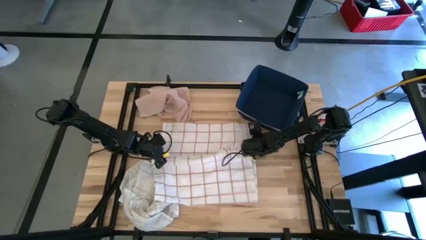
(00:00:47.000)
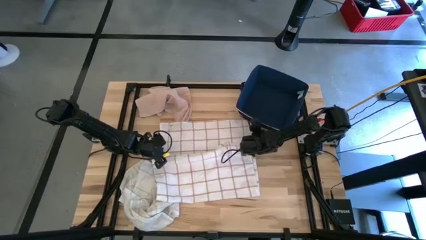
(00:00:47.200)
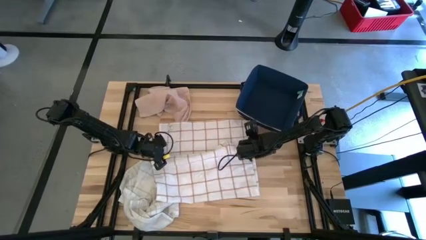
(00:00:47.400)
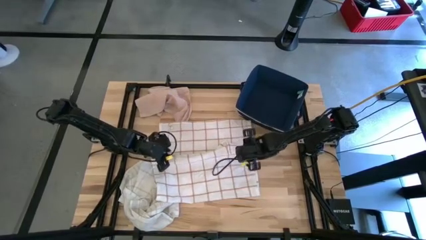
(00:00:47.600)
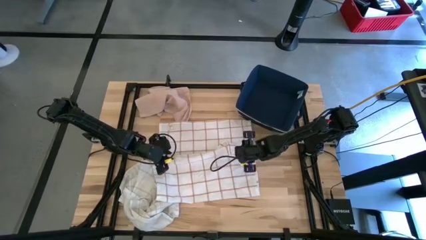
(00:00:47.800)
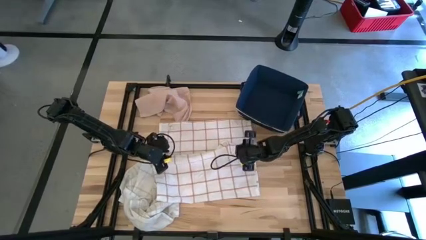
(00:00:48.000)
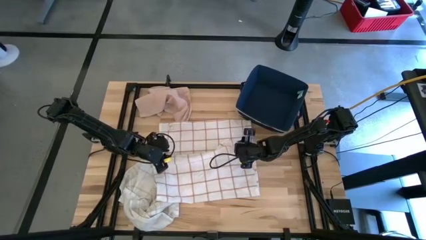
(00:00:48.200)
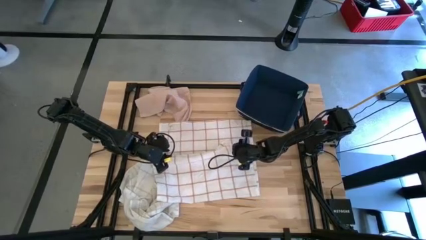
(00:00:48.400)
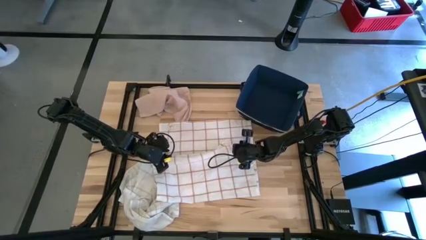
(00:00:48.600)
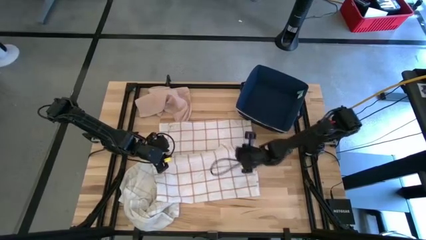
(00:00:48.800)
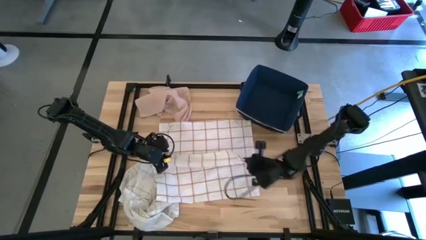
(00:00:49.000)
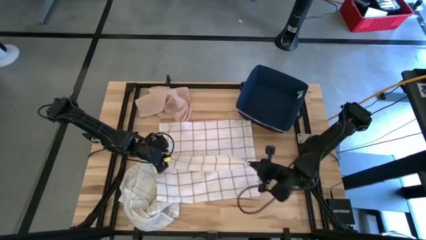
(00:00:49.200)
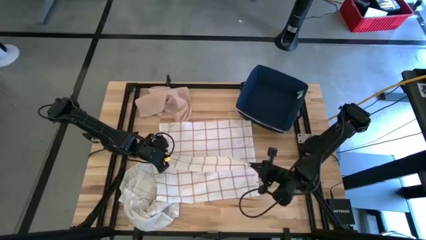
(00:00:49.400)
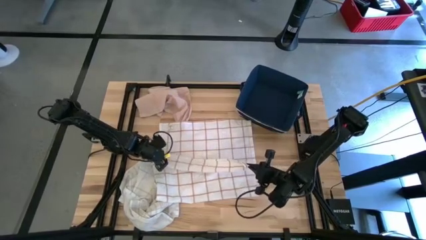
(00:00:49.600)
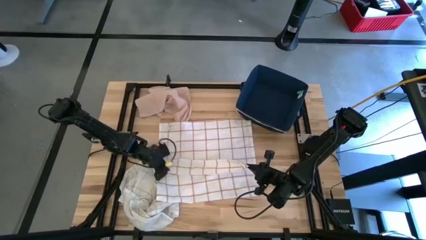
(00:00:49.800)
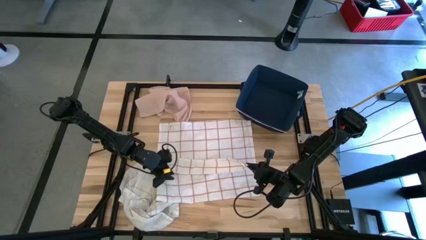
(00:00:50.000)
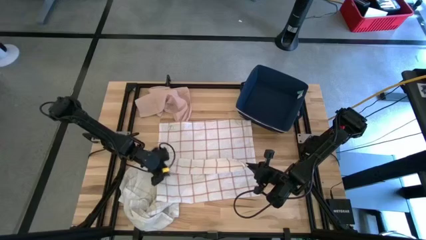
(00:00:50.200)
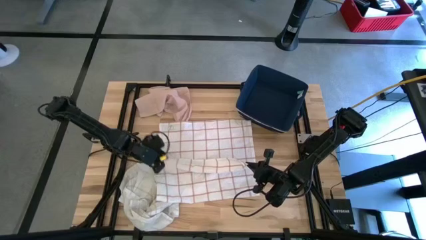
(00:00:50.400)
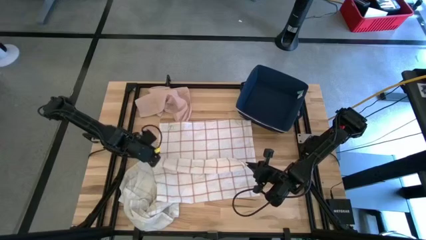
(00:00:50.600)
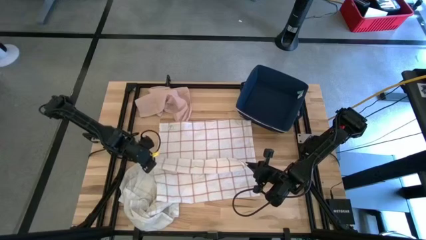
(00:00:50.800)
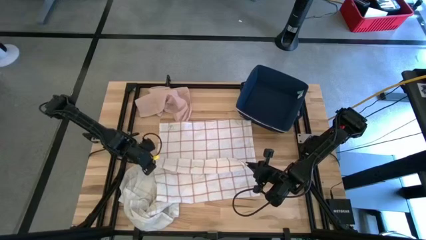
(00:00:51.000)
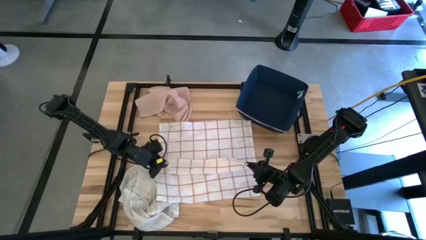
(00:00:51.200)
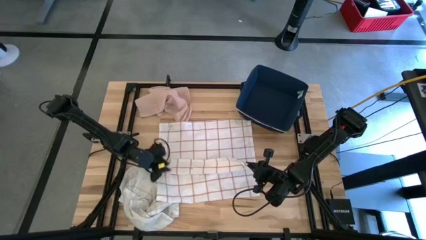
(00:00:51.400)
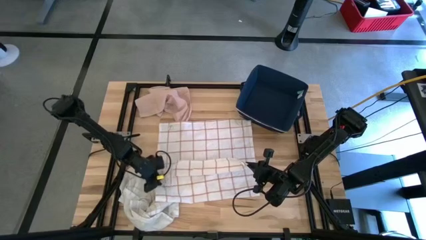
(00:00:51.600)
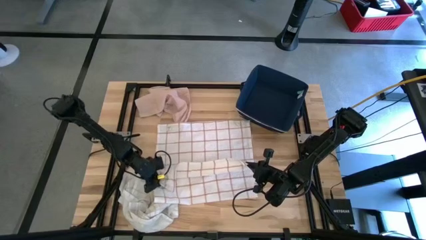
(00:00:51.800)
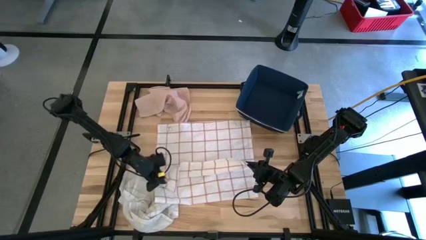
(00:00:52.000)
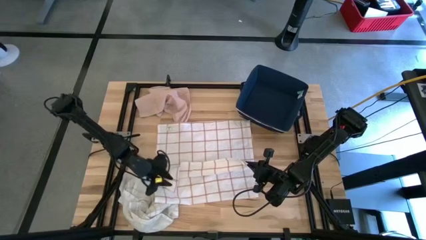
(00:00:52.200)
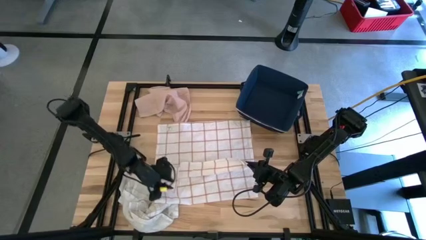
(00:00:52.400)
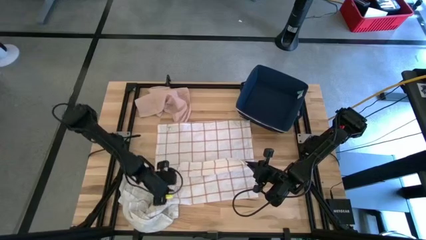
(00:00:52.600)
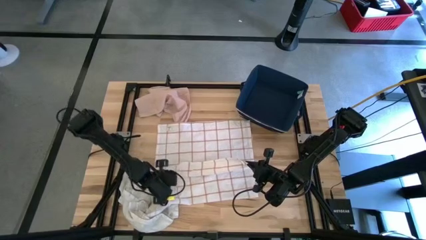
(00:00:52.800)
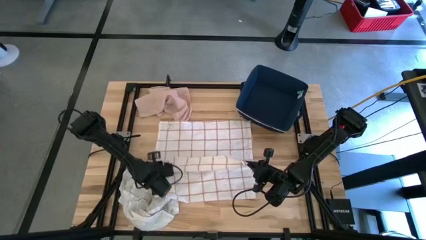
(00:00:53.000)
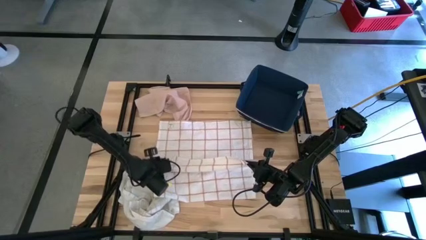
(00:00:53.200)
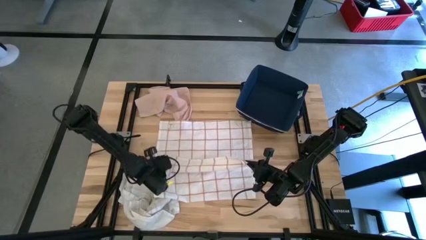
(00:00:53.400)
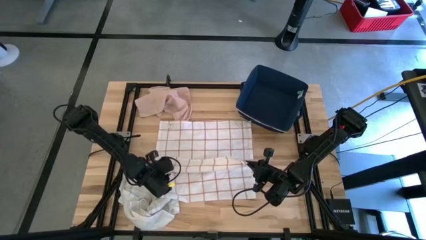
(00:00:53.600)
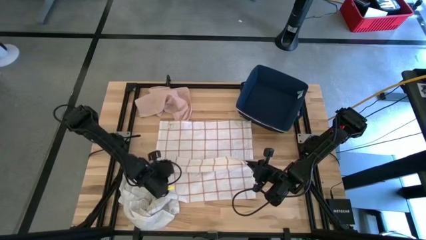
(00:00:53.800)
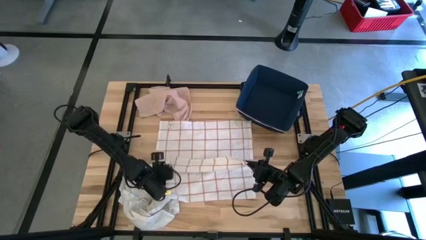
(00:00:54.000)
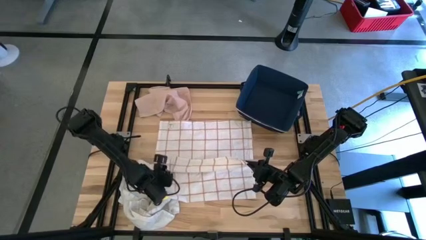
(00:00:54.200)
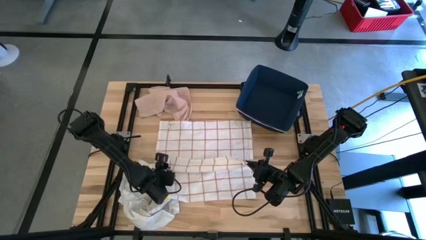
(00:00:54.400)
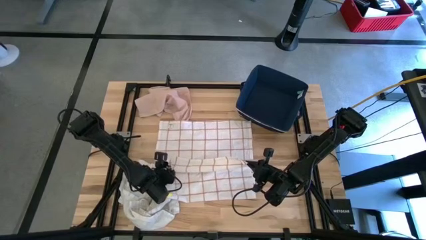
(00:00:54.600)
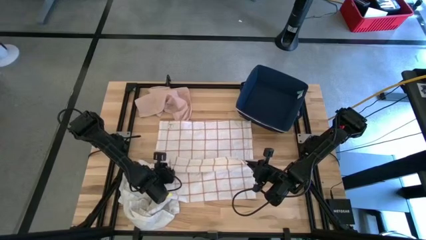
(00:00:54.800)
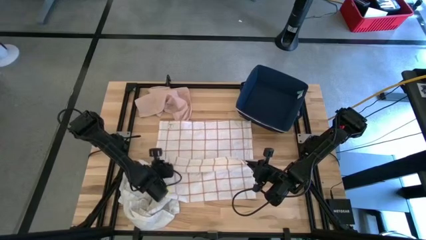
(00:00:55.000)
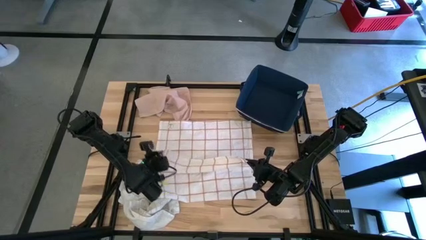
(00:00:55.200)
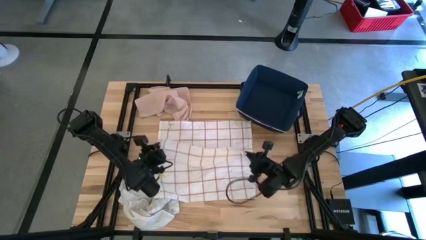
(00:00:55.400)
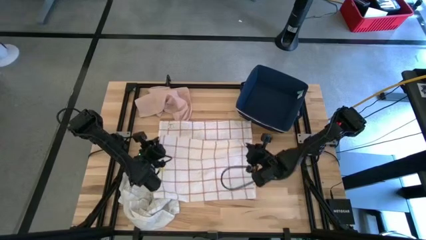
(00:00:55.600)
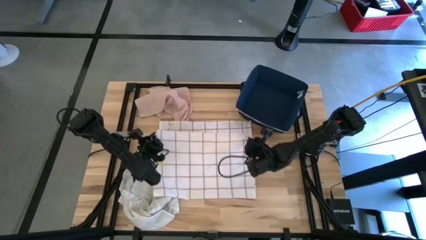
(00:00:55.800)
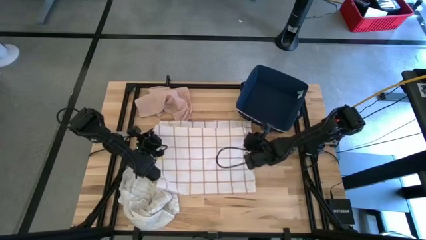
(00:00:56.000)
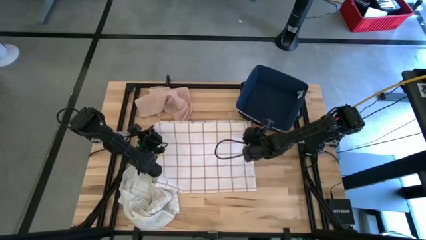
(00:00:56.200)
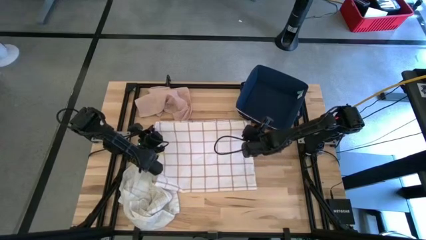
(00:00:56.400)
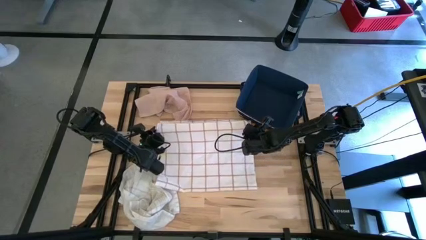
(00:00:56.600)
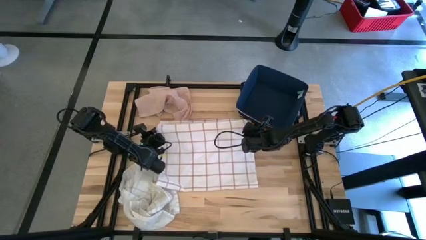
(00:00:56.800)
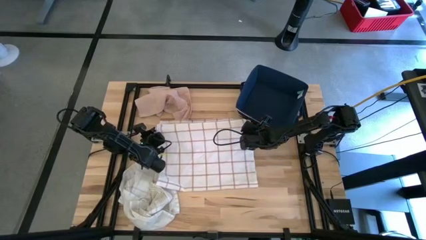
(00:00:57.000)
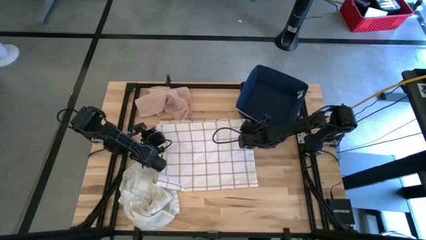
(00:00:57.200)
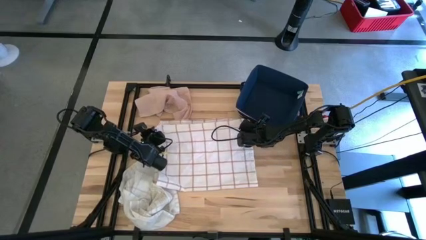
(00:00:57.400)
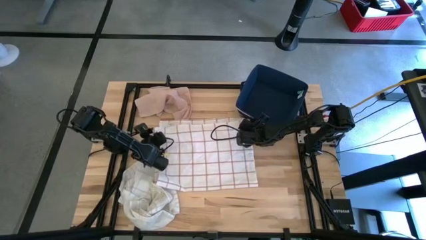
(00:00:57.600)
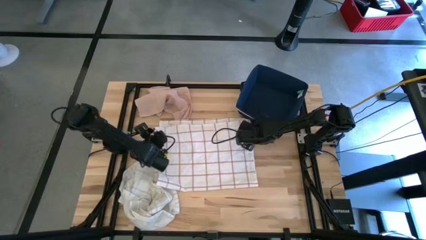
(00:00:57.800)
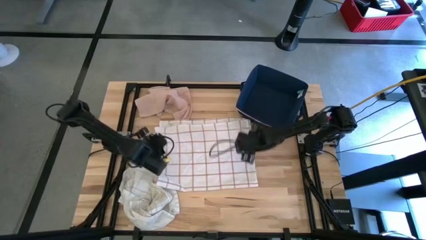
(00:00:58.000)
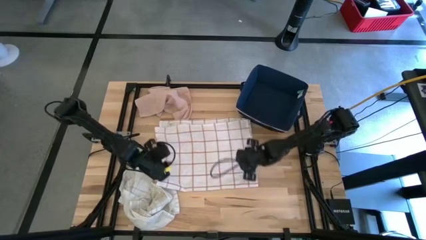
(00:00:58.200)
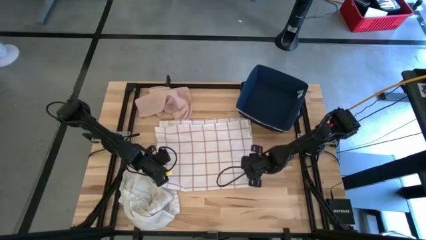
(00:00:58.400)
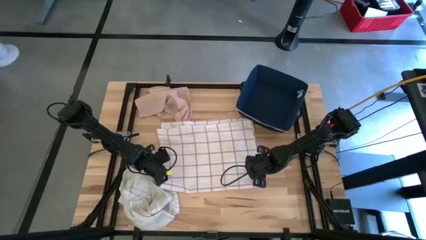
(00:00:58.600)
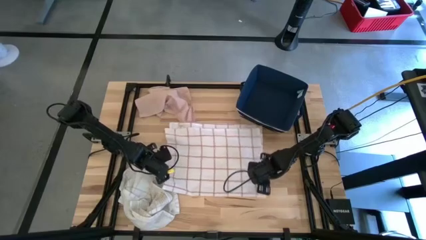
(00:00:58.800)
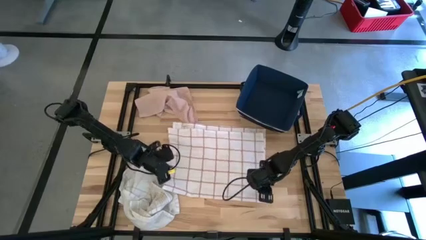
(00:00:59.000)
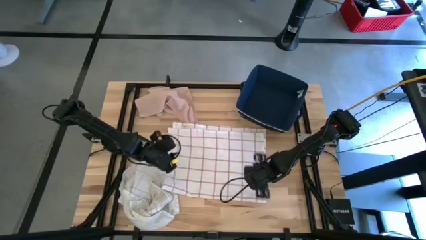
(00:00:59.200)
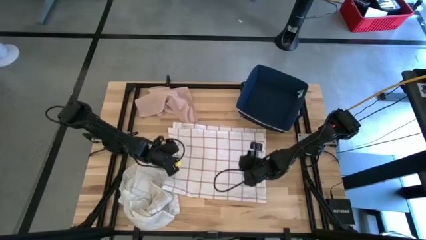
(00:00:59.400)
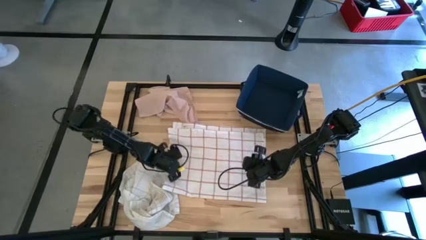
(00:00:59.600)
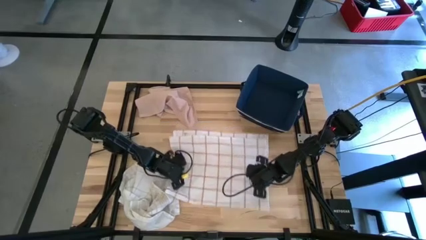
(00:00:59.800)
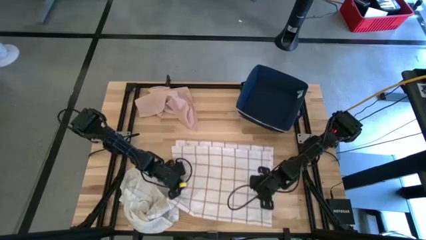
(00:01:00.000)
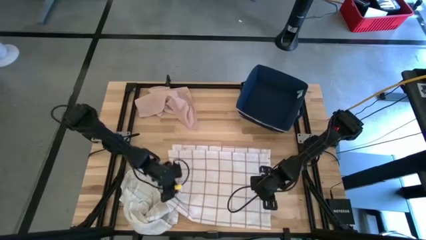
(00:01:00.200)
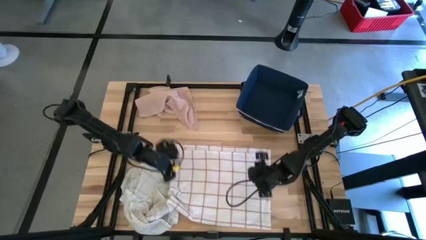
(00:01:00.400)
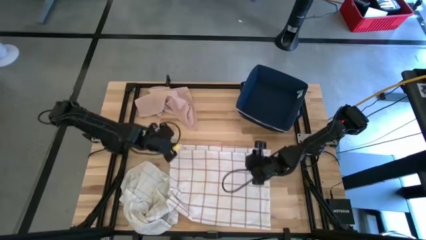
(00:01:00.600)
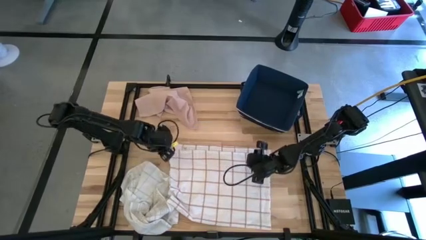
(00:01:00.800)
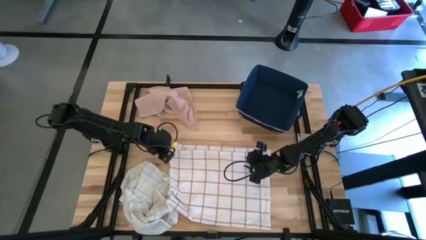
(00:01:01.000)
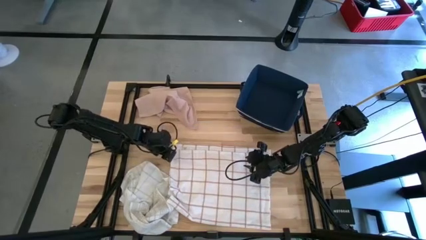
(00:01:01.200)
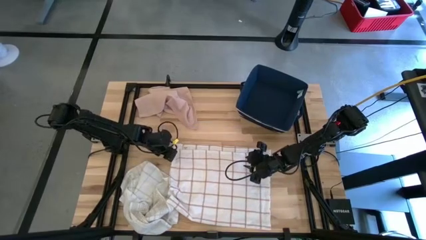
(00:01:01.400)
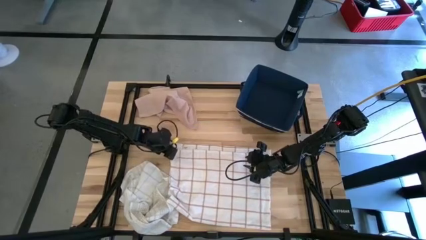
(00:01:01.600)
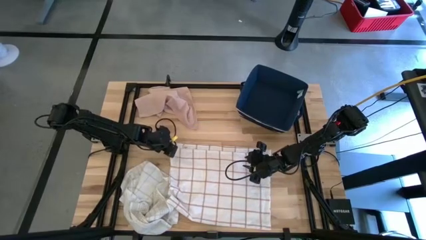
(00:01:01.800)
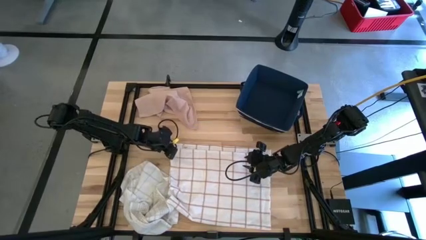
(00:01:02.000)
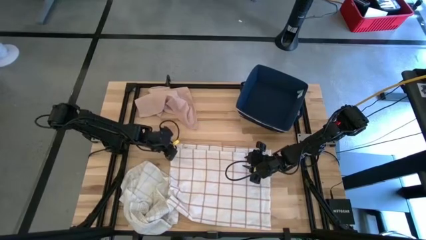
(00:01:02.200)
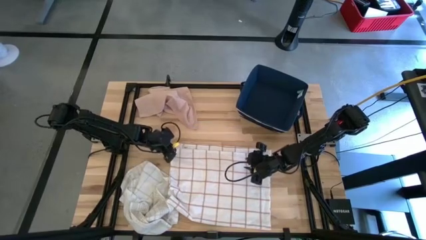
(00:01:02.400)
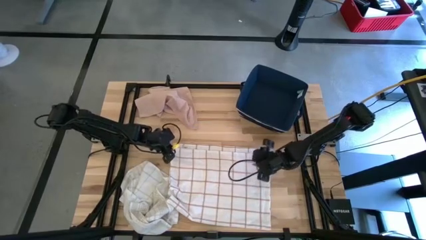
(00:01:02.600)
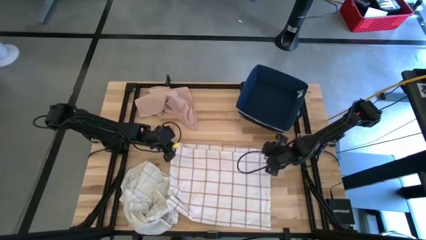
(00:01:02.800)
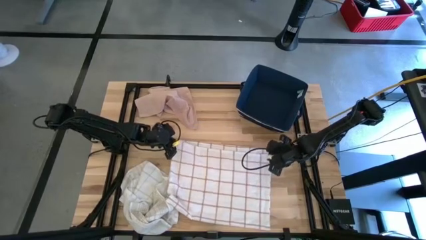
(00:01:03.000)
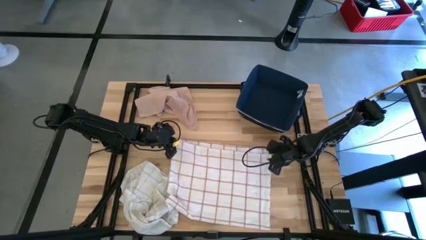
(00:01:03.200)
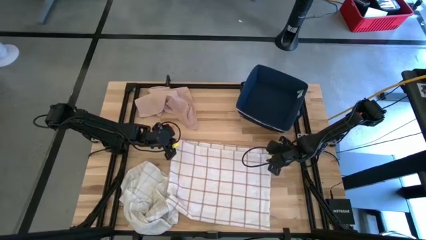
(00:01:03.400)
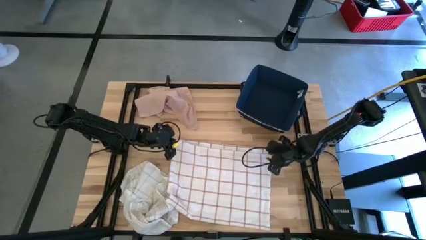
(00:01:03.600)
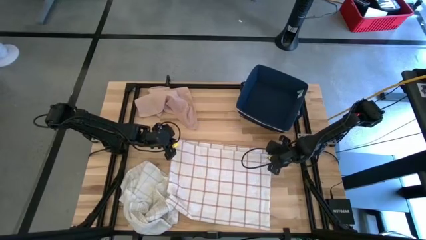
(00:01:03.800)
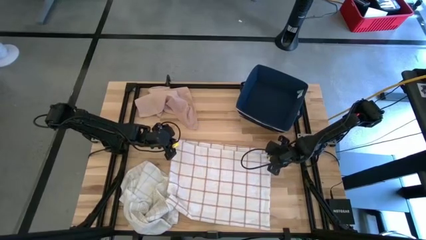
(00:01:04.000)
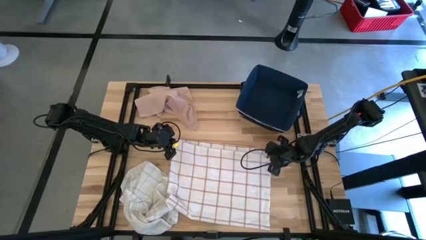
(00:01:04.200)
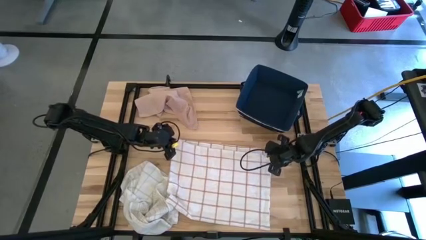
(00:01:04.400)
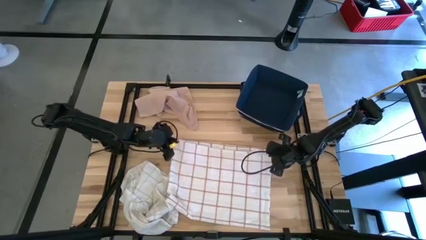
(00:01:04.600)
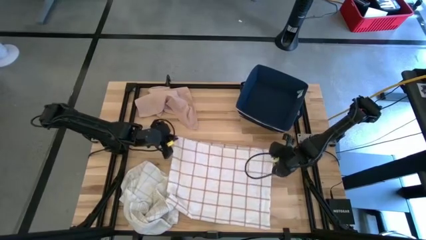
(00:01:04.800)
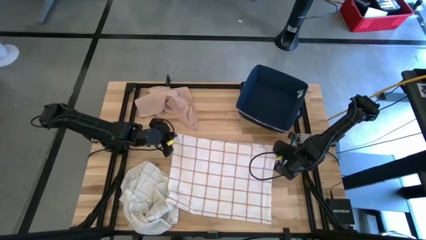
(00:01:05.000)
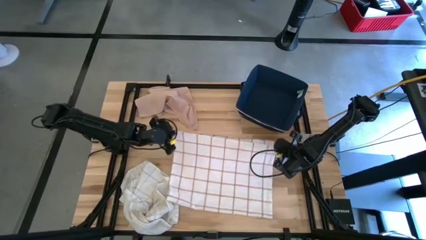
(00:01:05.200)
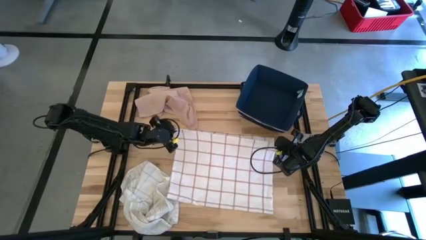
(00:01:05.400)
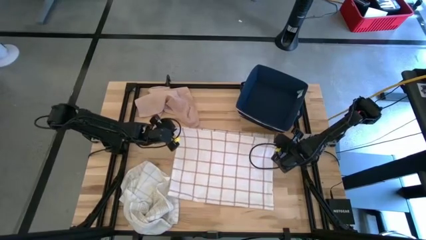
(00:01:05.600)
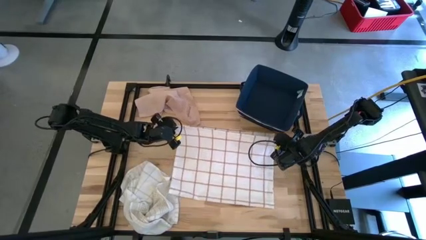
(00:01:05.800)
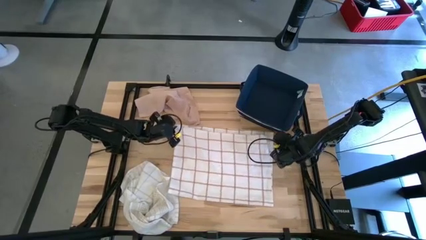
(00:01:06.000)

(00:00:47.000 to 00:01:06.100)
Task: Fold towel
Fold the white with red-stripe towel
